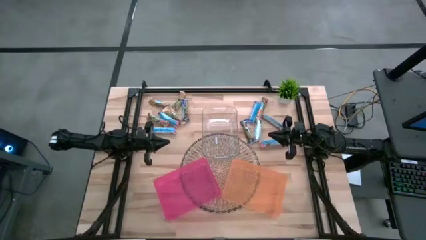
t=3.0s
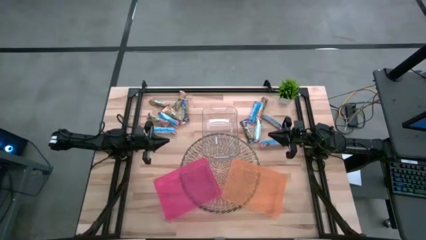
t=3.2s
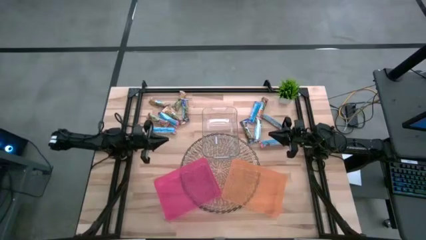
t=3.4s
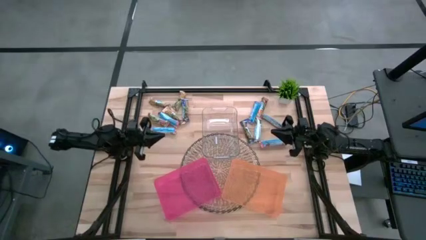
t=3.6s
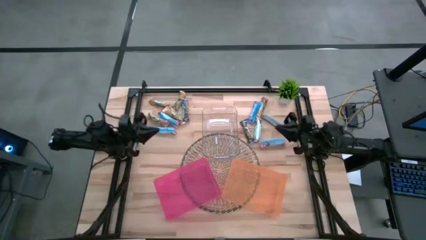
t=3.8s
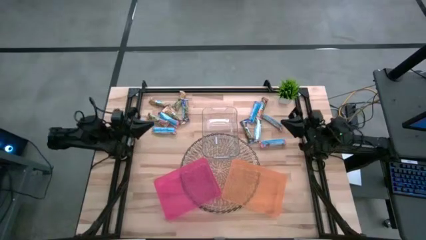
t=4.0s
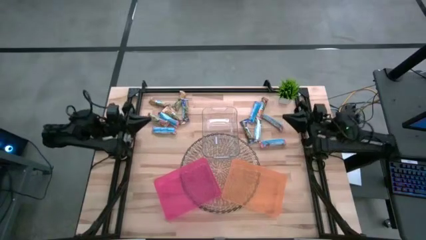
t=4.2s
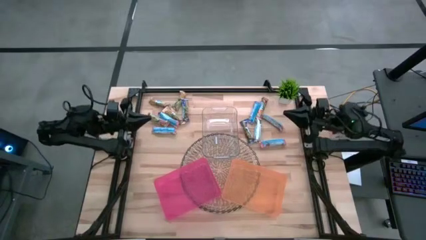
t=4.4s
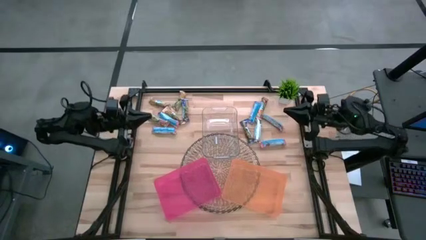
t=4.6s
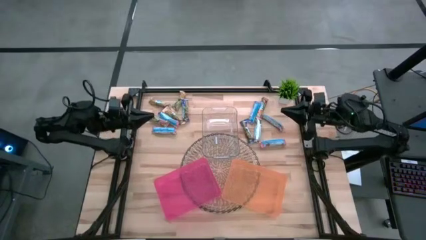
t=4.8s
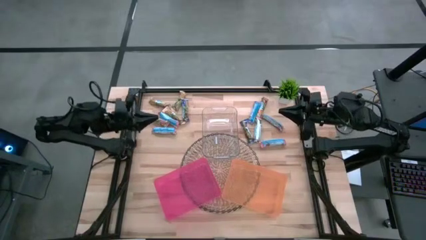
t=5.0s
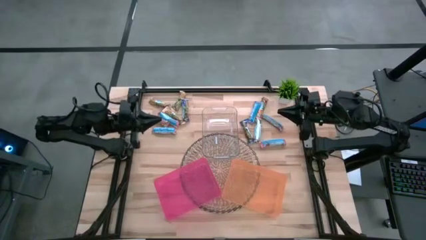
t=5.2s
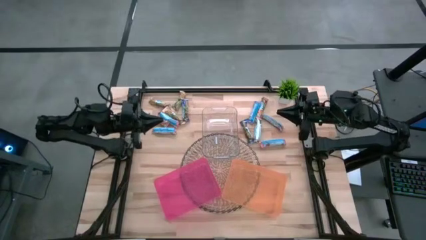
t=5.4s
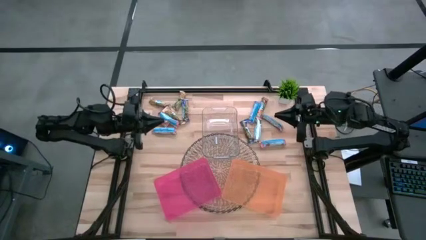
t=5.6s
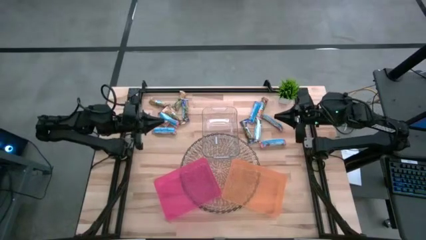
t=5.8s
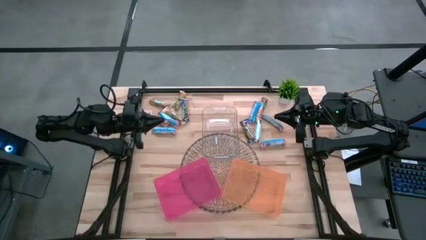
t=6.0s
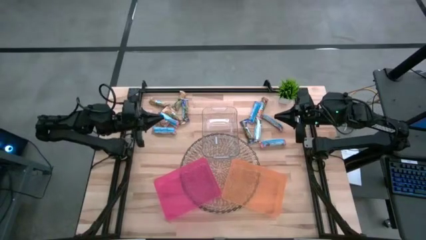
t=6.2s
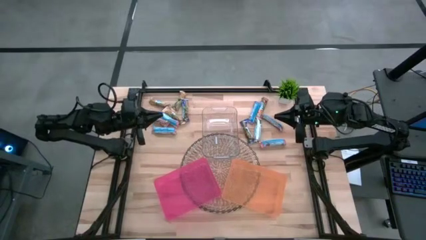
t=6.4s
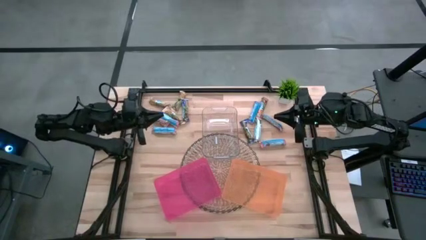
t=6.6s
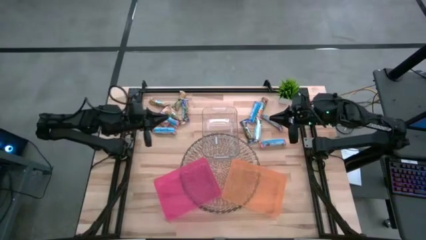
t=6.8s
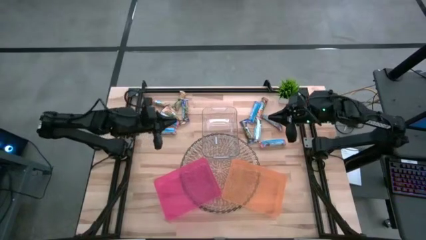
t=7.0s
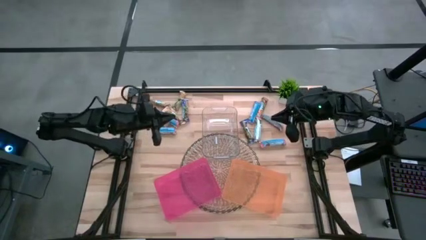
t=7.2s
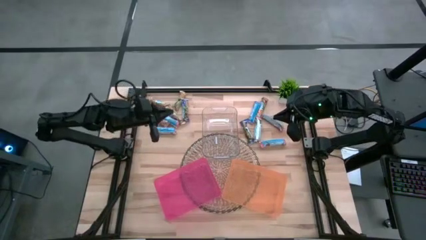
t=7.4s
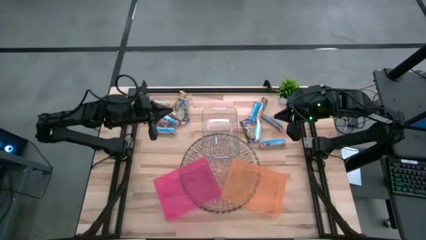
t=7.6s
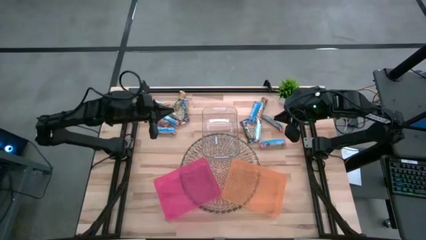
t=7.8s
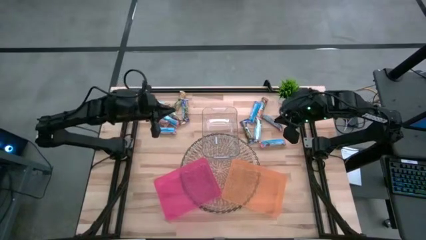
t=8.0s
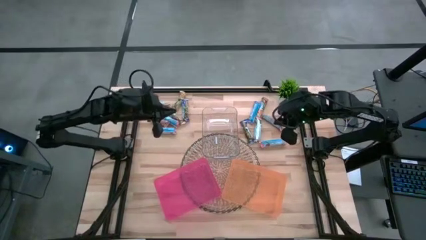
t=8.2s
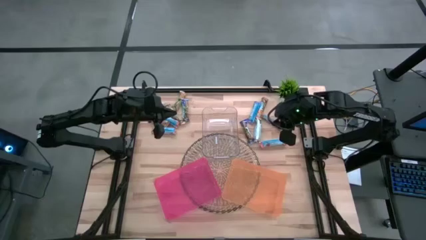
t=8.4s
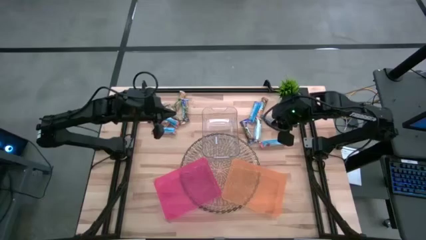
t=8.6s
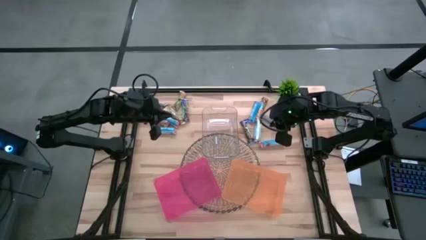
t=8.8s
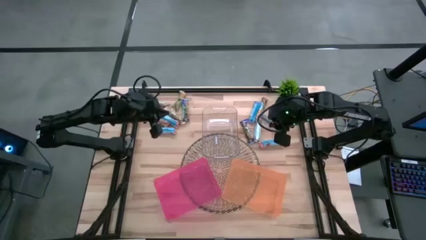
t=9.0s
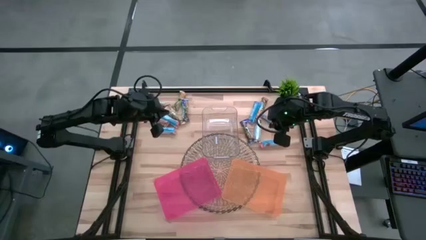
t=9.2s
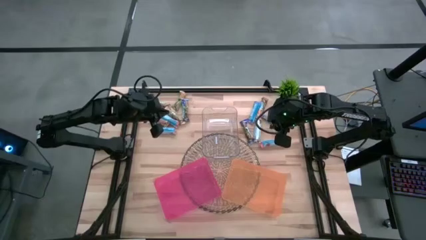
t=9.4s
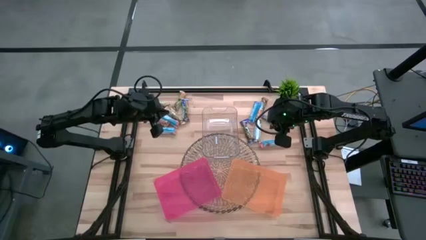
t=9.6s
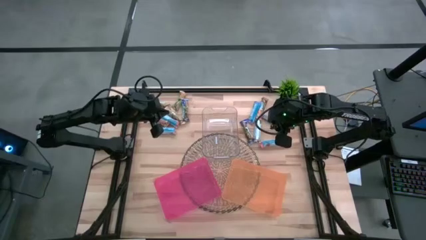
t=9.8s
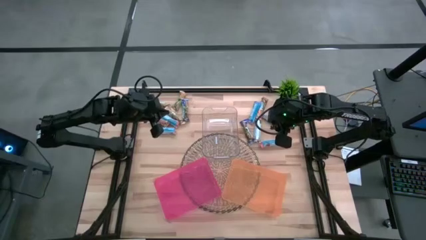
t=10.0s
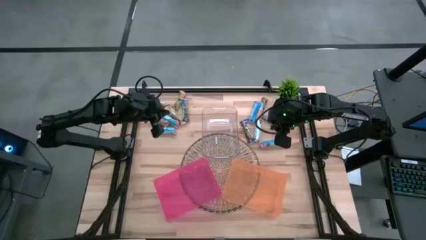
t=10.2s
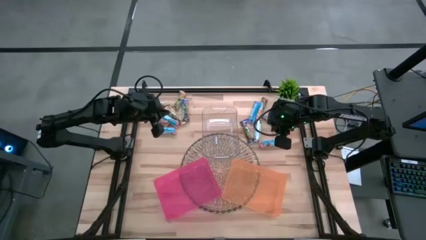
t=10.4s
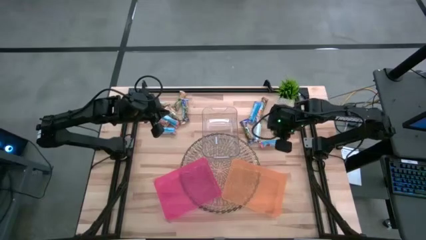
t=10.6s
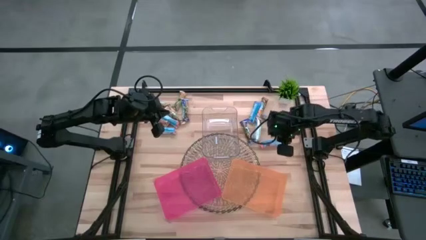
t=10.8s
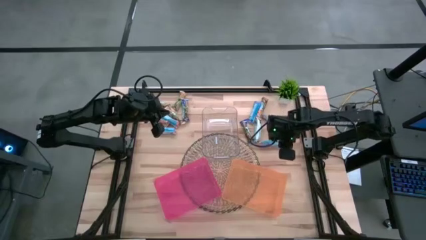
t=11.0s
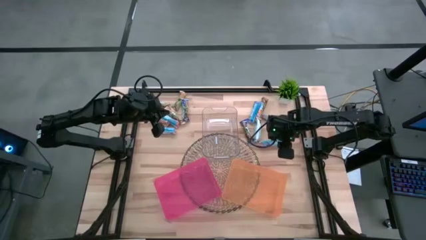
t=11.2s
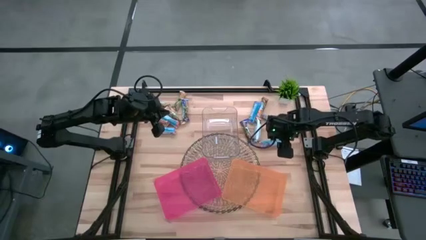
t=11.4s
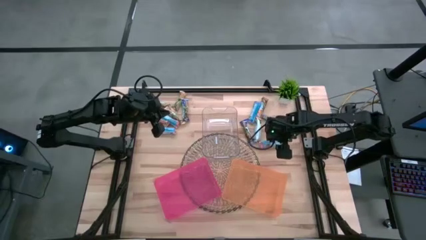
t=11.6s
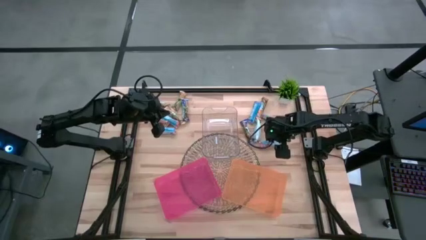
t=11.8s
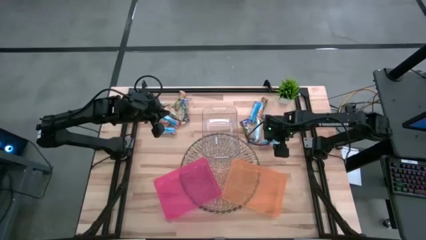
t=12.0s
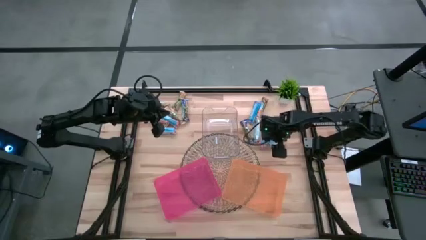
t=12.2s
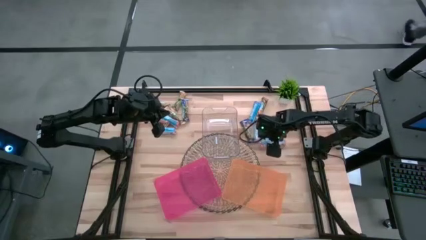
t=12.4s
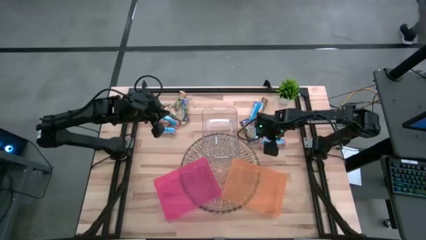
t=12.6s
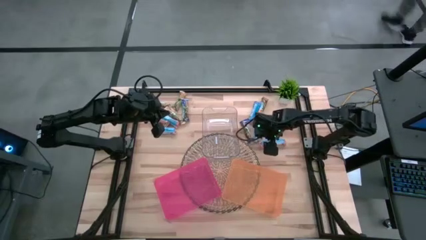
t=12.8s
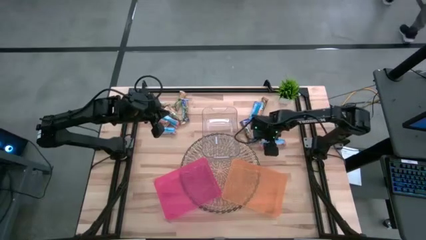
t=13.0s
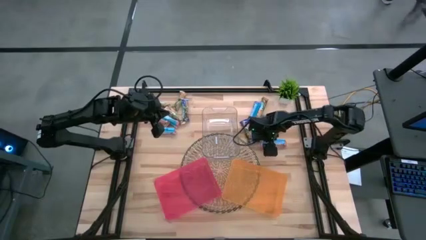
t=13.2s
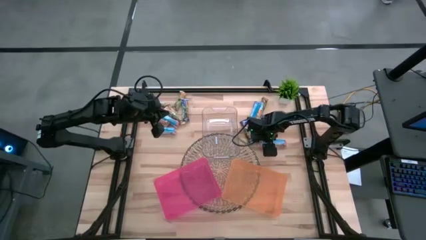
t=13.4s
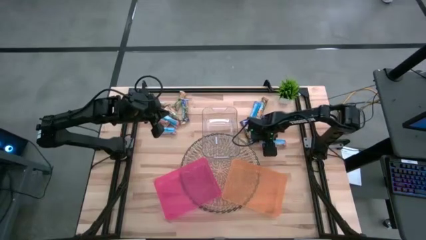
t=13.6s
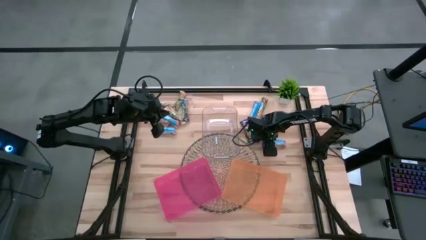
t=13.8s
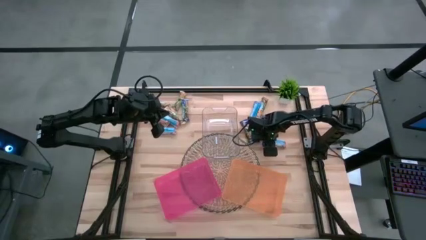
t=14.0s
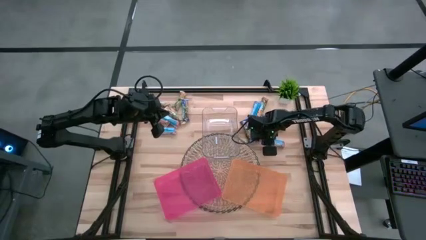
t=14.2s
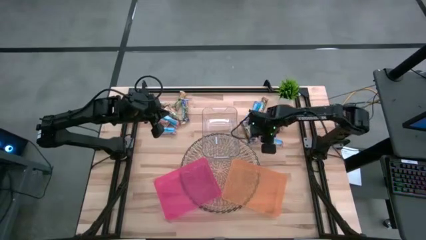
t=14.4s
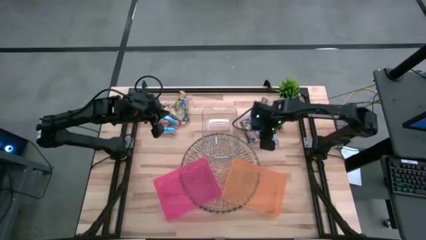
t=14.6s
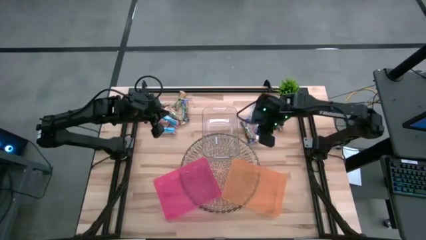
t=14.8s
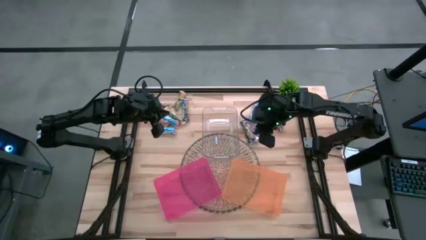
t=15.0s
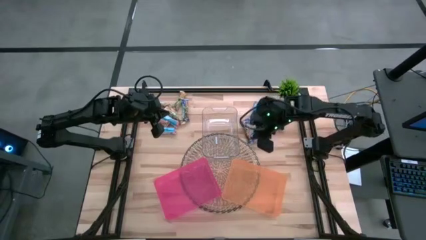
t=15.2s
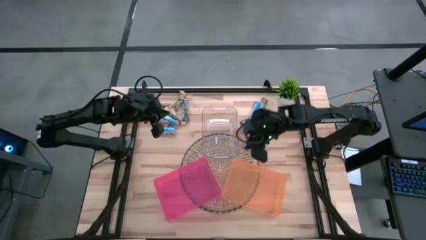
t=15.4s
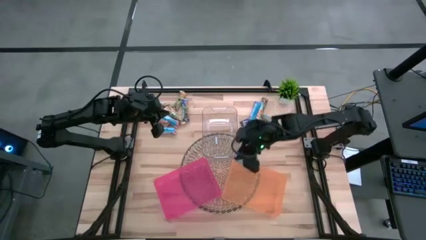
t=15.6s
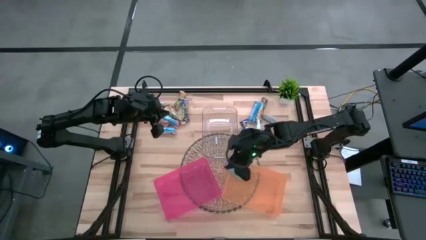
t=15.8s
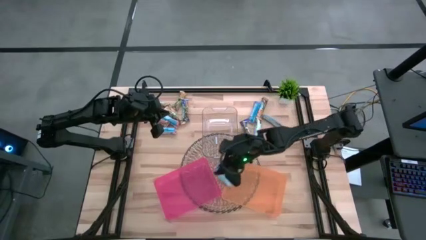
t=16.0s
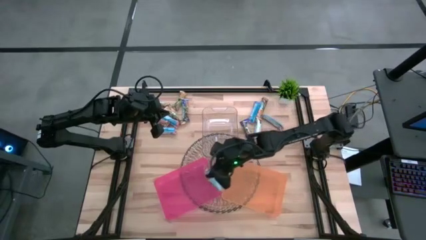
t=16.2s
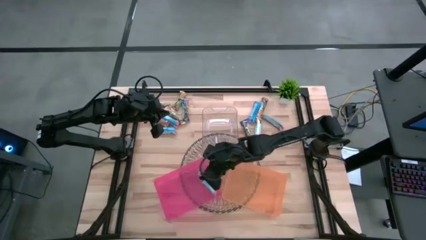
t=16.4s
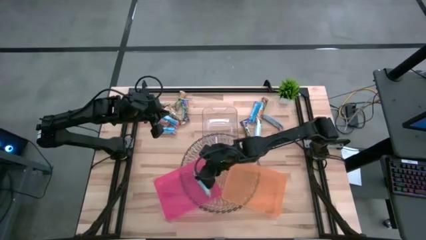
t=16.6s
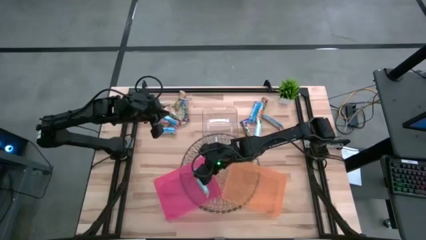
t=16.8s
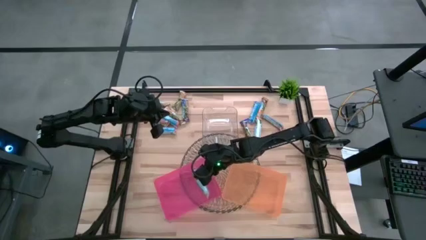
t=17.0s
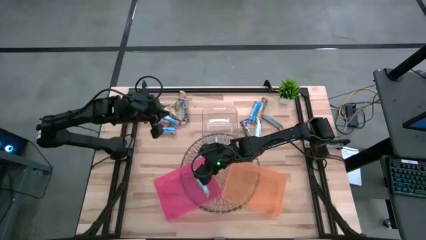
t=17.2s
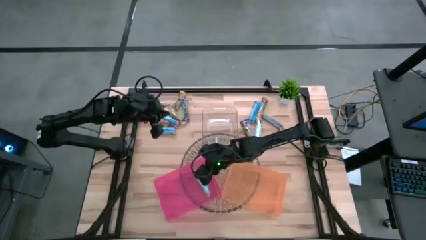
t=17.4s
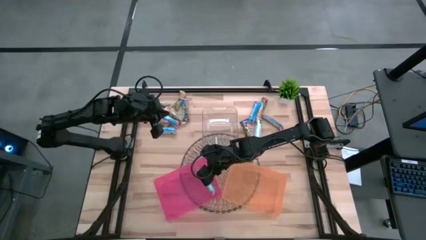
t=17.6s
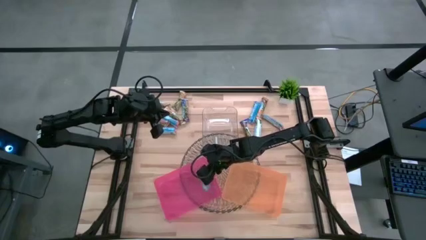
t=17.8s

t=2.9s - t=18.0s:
Task: Pick and place Granola Bars by type
Put the red granola bar into the red bin
